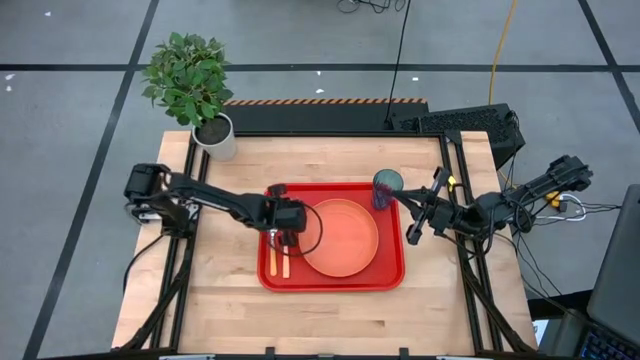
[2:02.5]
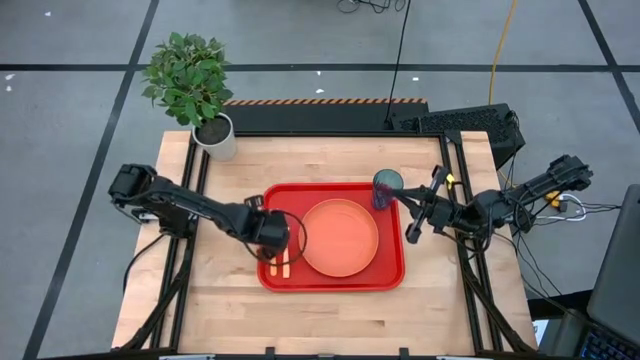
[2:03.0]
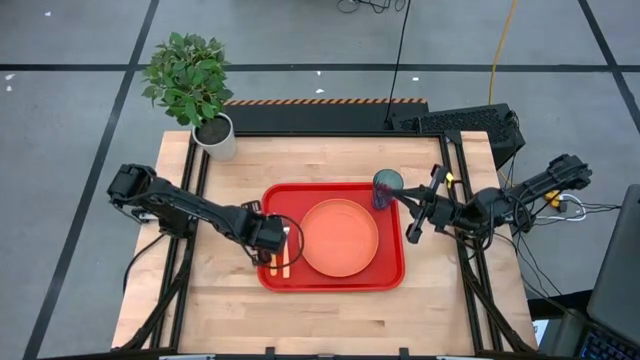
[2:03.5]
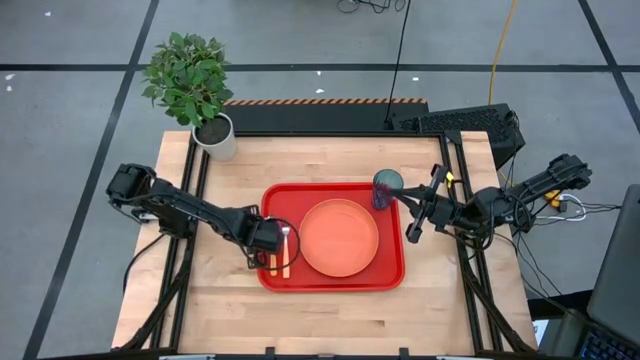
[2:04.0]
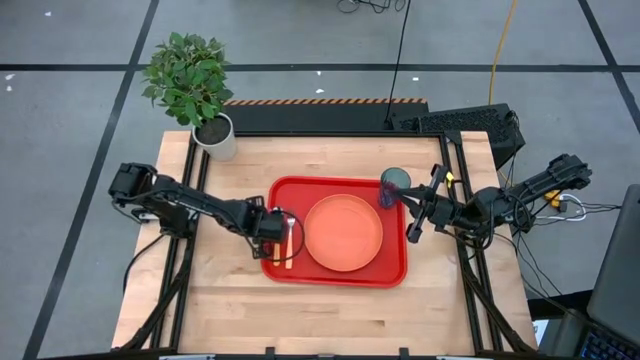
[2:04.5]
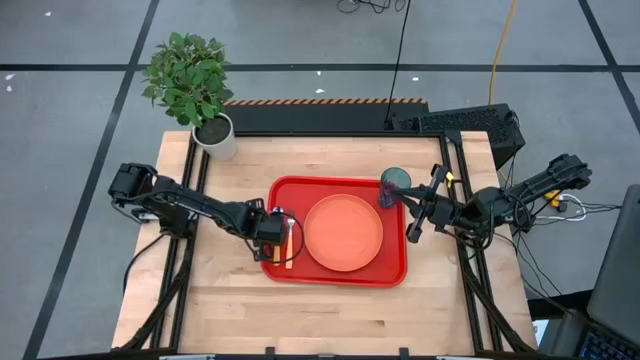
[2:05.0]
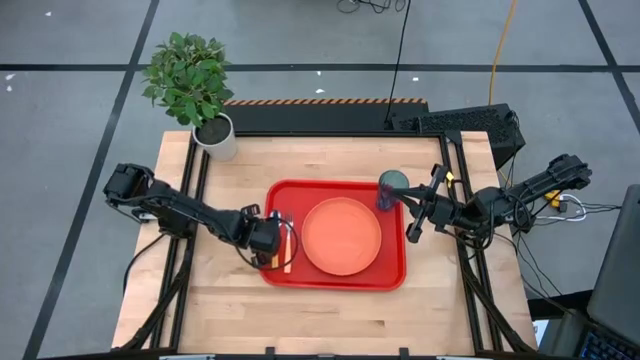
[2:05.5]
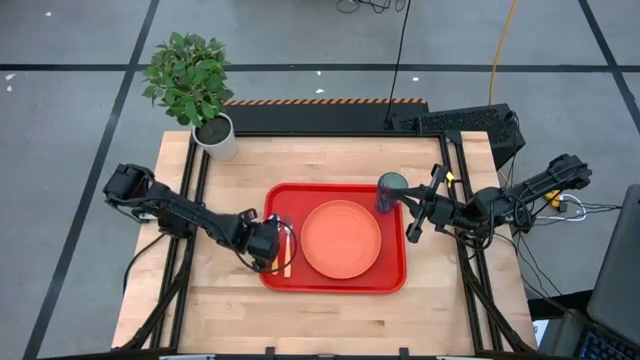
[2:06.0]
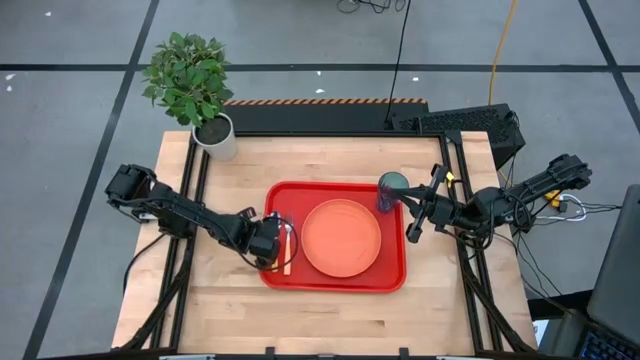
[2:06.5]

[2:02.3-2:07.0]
Task: Pick and place plate/cup/fork/spoon on tray
Adjust the red tray

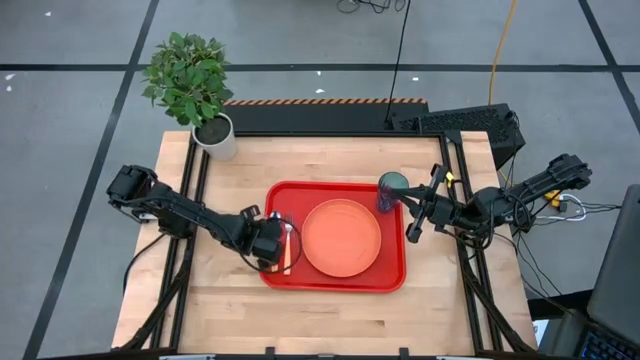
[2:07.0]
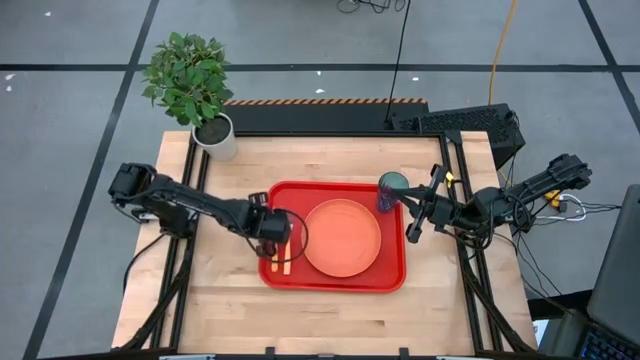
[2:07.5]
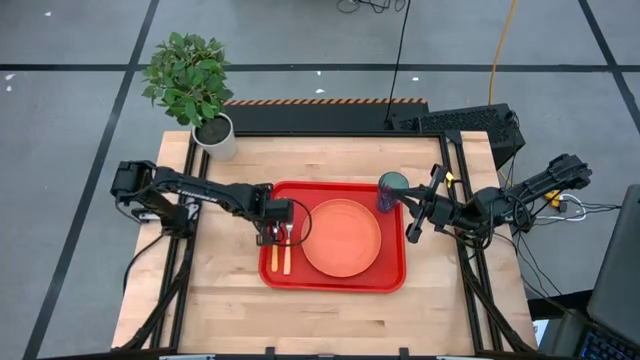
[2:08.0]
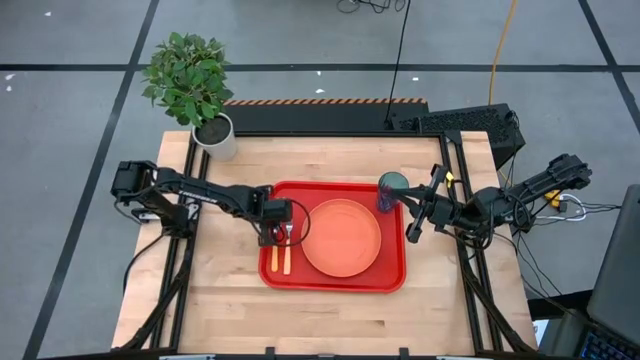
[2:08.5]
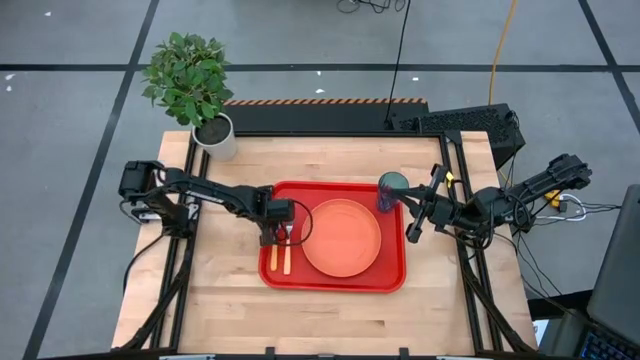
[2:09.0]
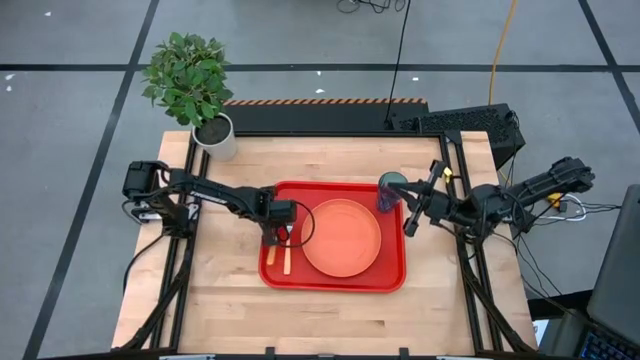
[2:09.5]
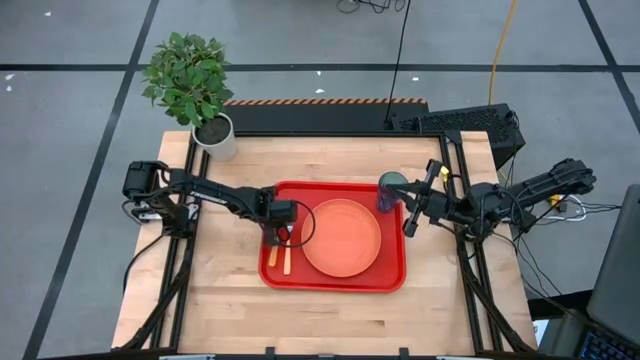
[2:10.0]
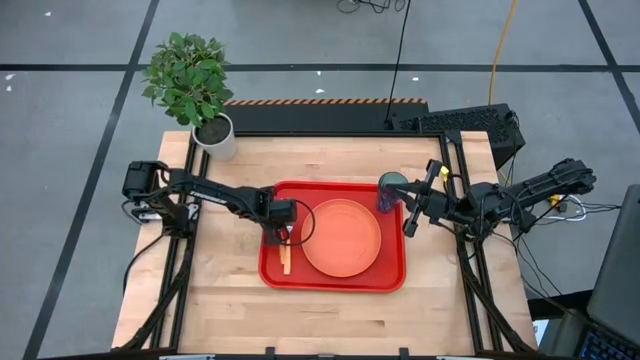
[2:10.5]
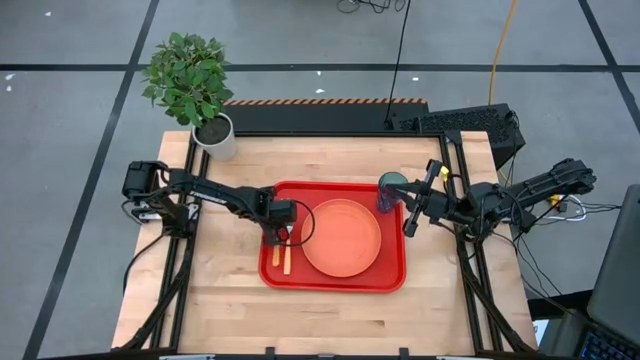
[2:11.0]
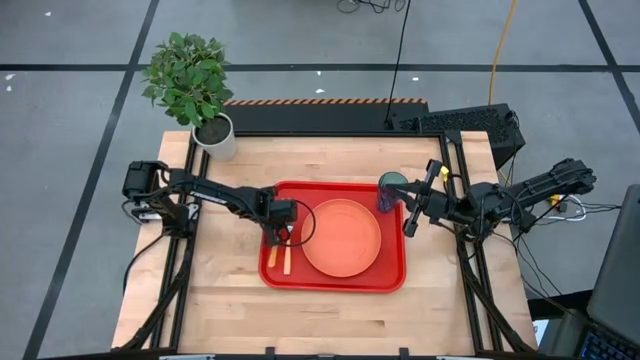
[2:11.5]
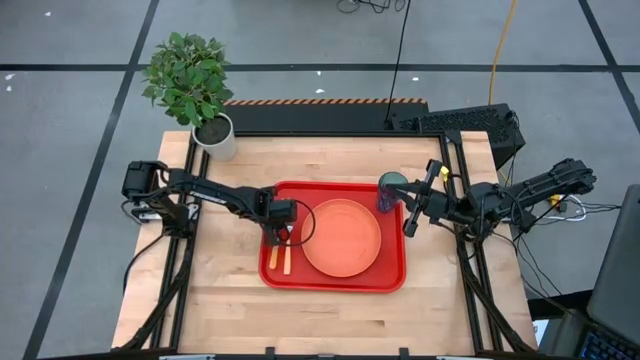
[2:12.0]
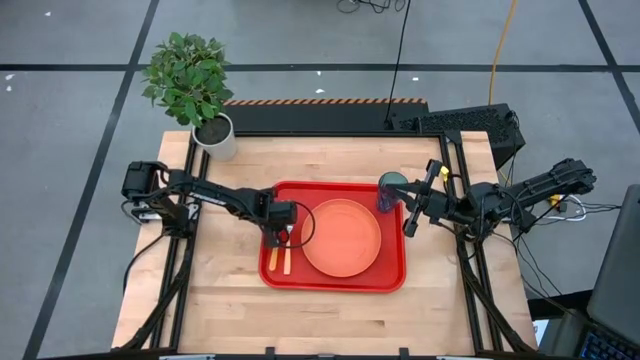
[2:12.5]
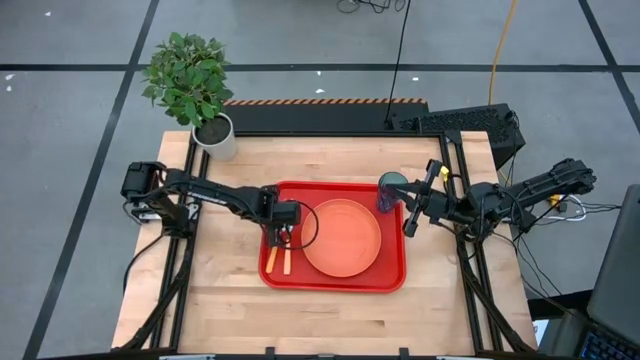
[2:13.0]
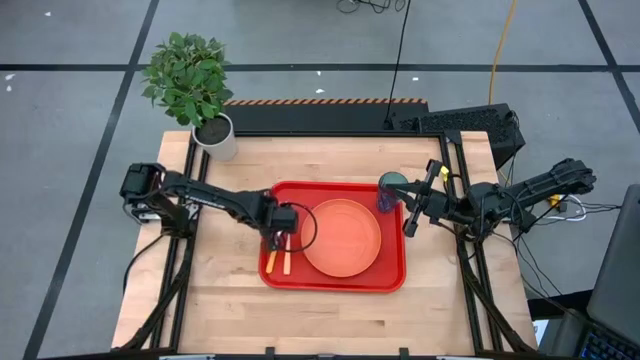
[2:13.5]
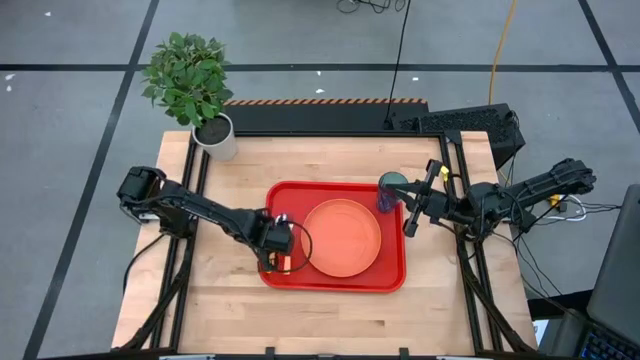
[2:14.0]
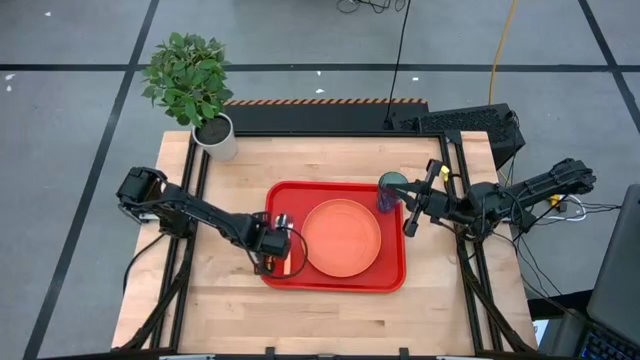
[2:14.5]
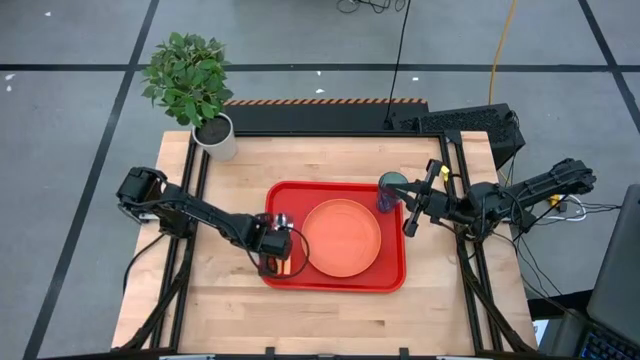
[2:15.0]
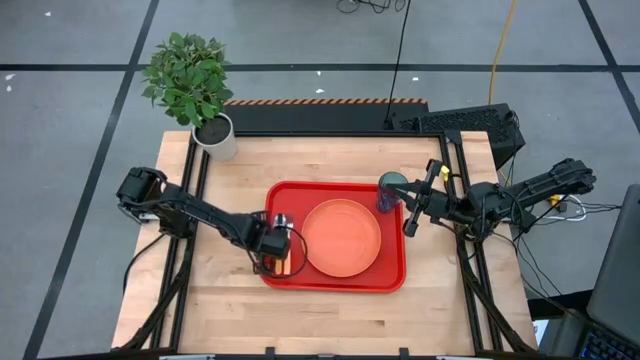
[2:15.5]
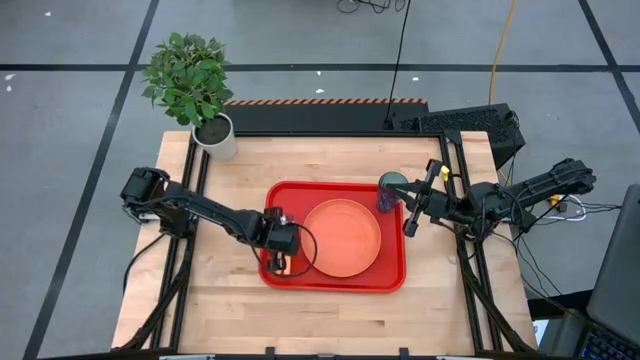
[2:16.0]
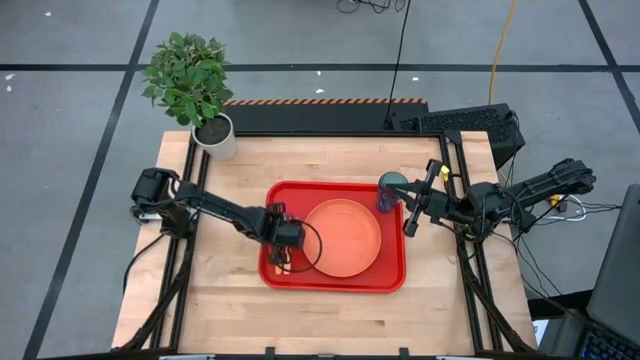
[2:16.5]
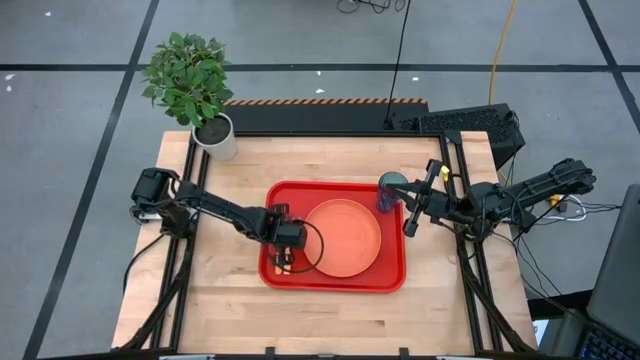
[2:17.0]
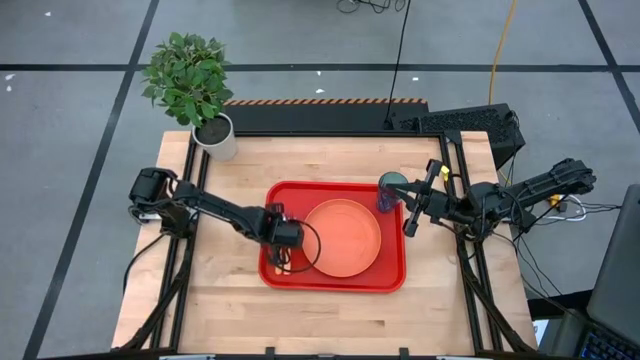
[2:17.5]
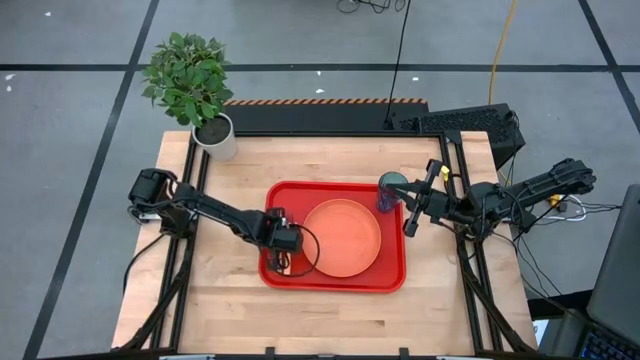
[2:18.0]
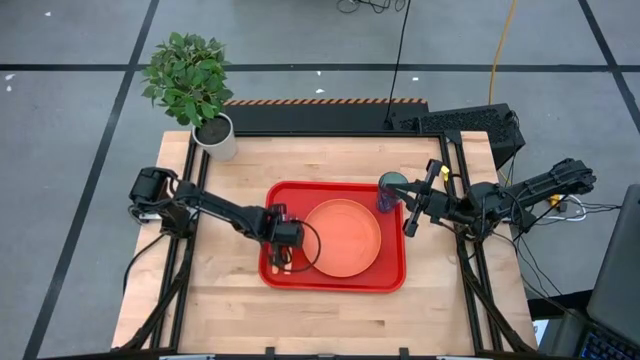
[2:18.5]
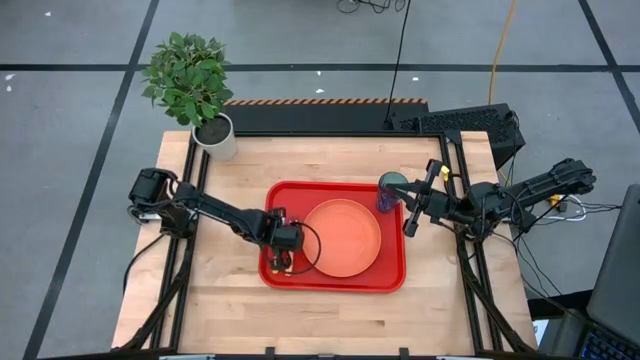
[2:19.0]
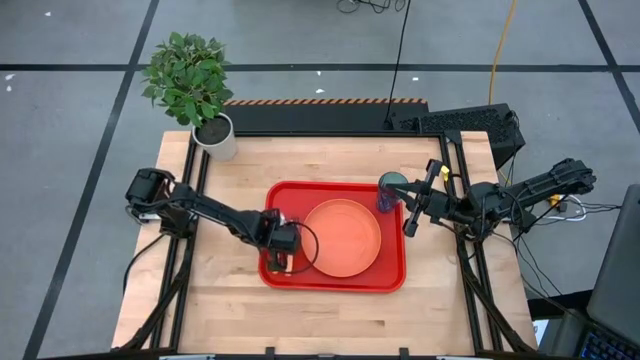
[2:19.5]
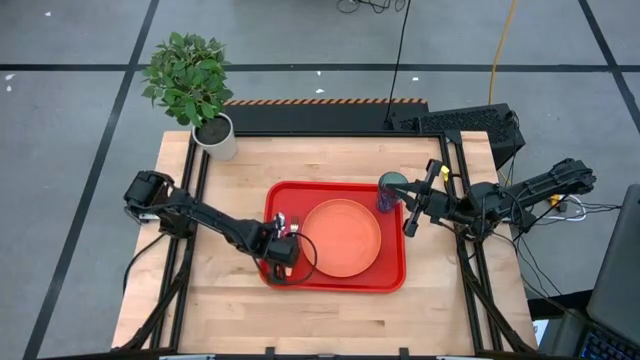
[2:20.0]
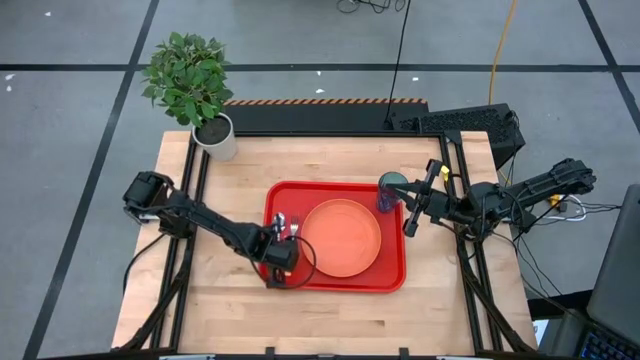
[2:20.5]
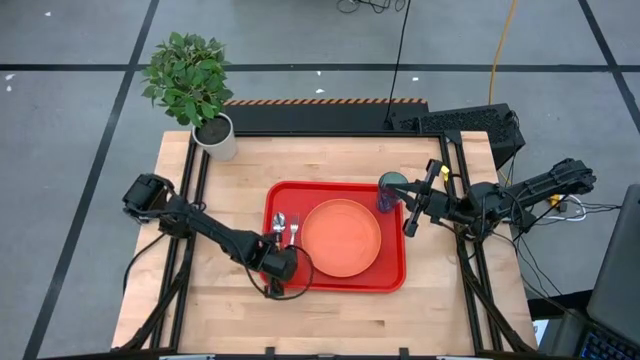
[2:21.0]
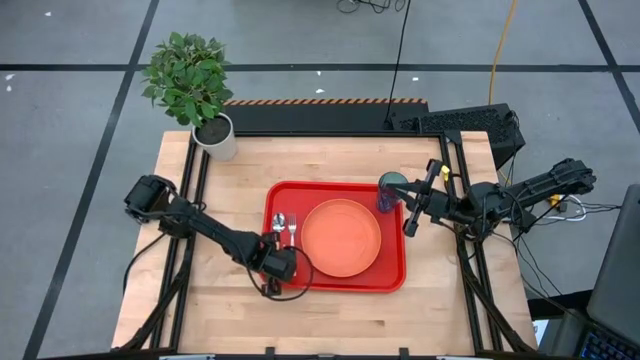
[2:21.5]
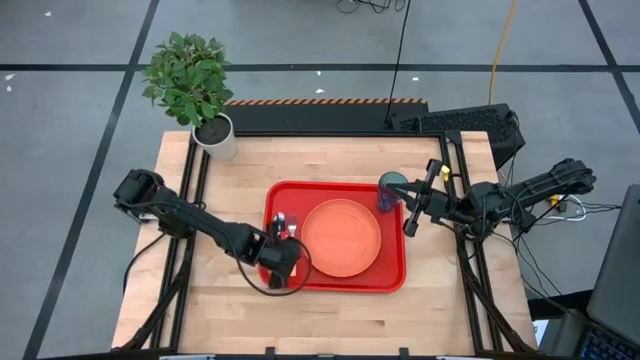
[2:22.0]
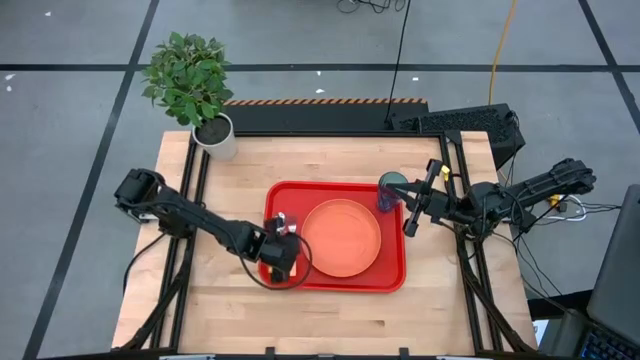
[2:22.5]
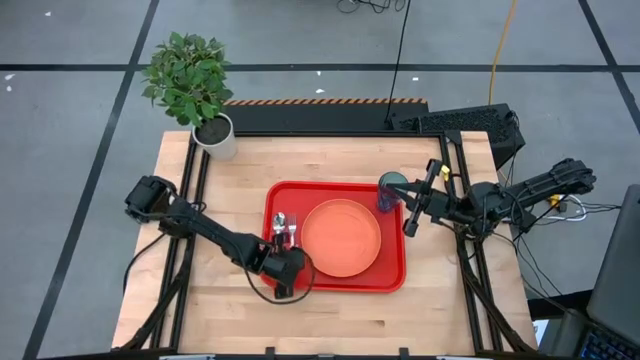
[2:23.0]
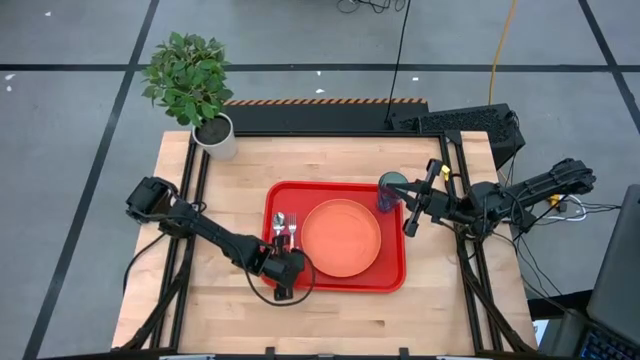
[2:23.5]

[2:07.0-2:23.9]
Adjust the utensils on the red tray
